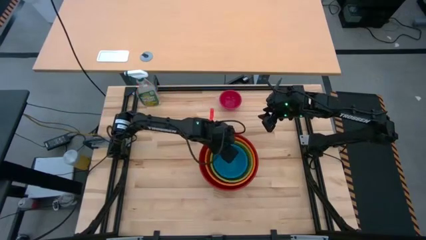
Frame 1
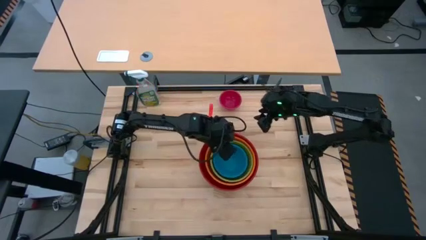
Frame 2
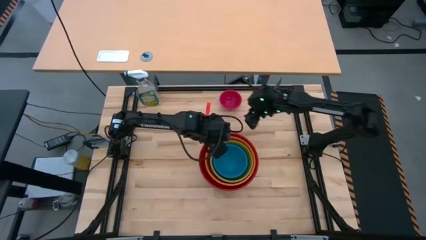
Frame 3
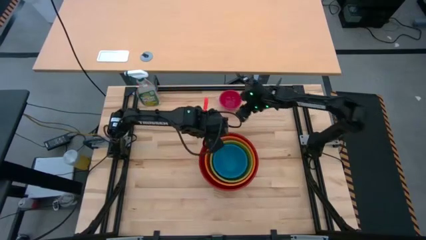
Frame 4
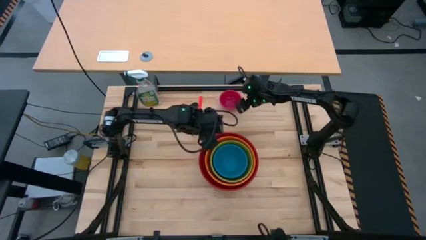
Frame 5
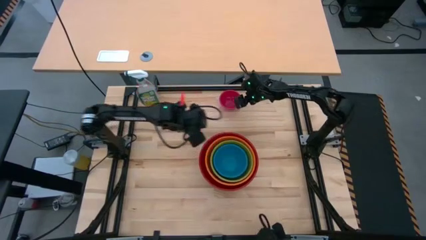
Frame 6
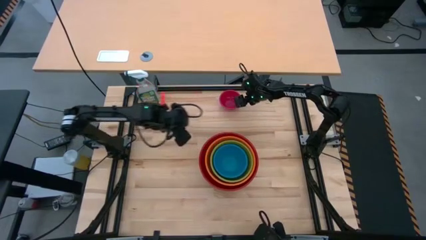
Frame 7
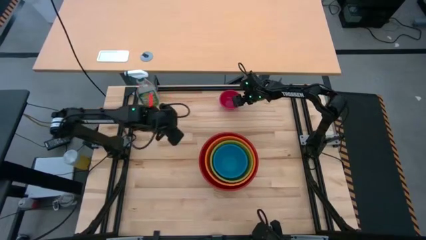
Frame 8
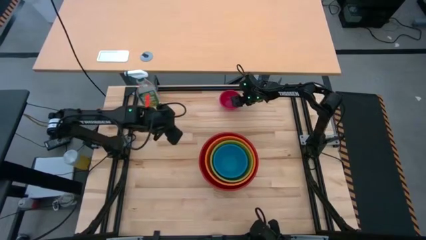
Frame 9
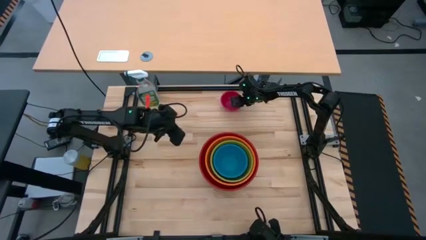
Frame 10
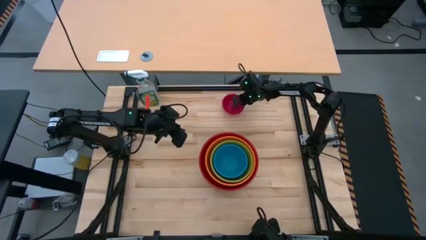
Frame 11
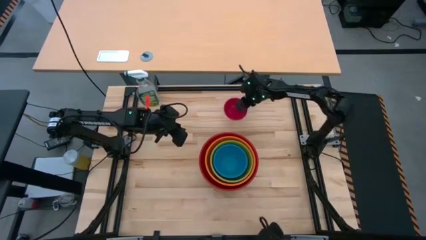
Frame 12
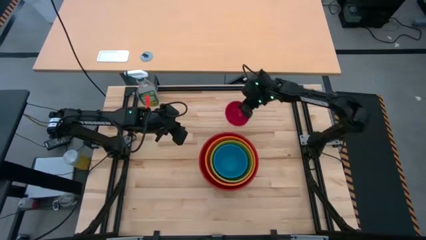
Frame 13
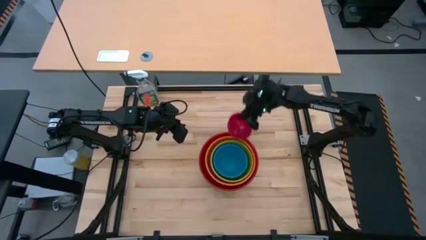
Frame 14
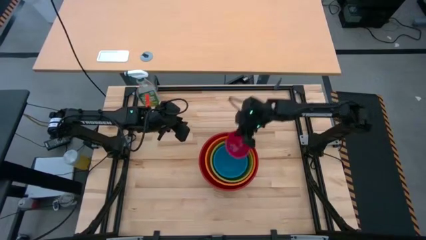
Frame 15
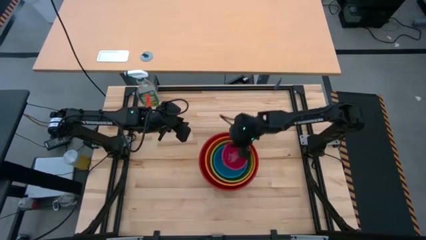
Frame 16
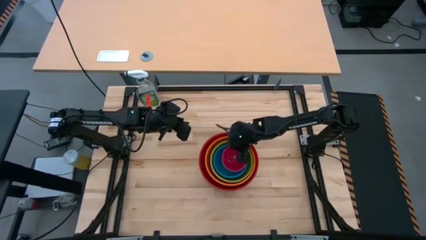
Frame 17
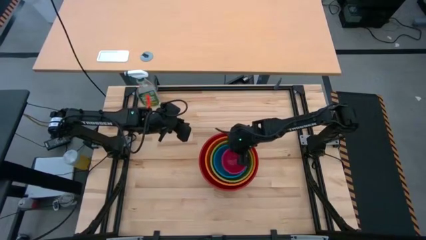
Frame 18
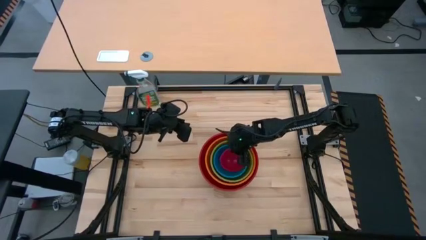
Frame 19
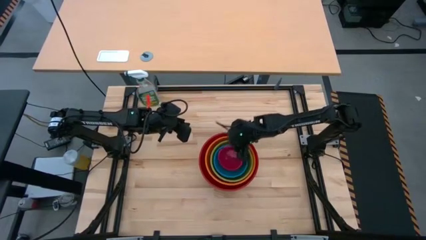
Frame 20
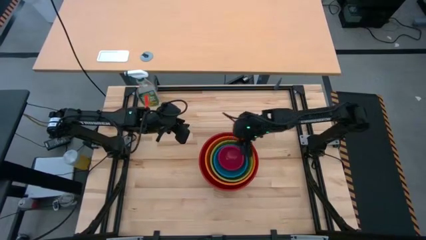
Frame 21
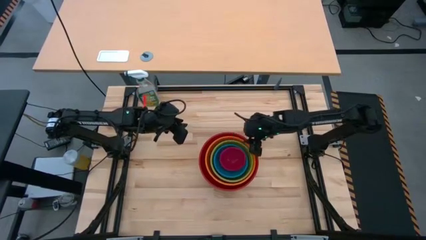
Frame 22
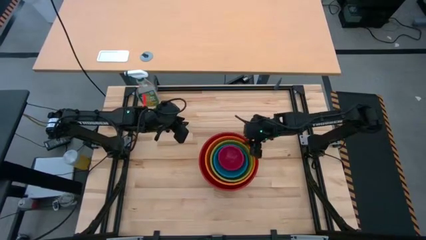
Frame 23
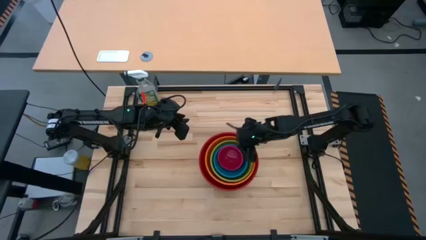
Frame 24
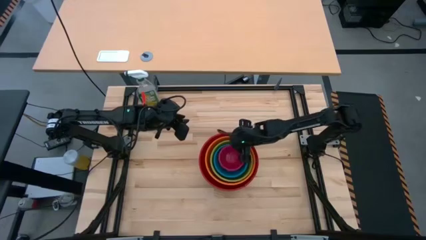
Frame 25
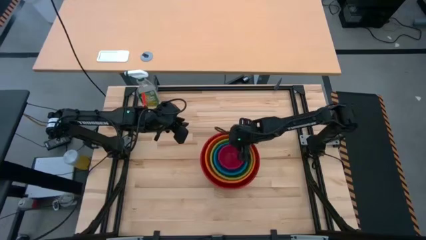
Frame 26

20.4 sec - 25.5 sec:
Stack the pink bowl on top of the blue bowl

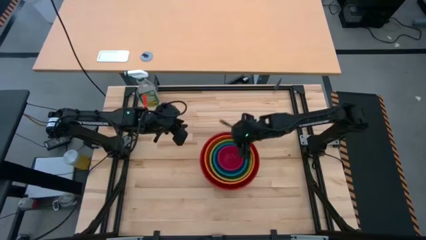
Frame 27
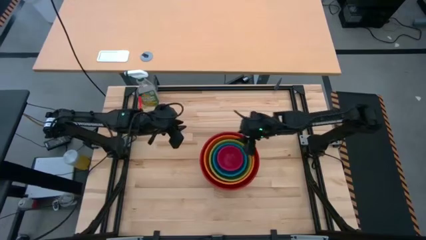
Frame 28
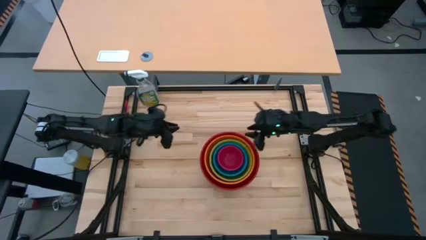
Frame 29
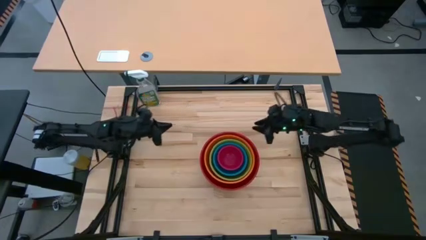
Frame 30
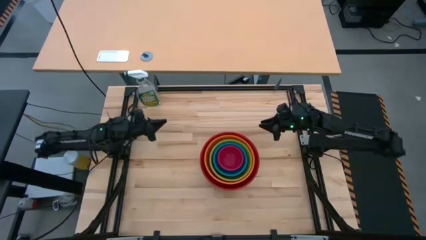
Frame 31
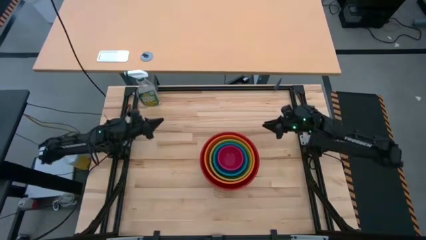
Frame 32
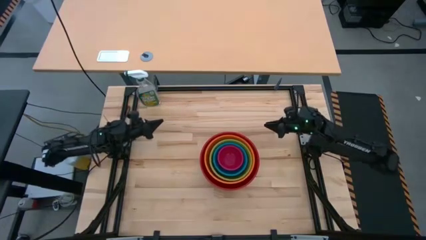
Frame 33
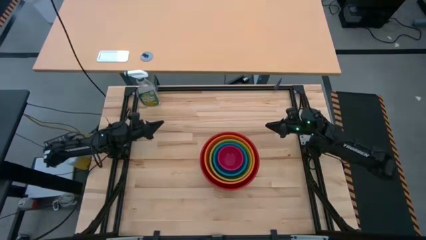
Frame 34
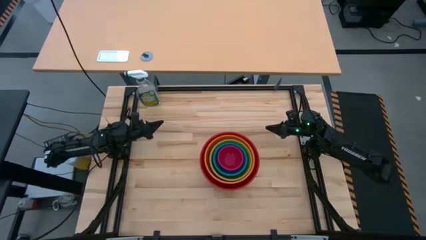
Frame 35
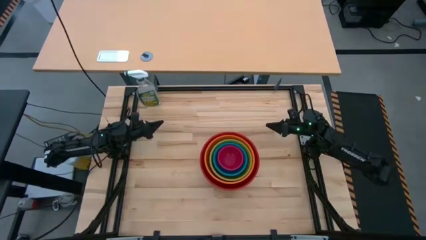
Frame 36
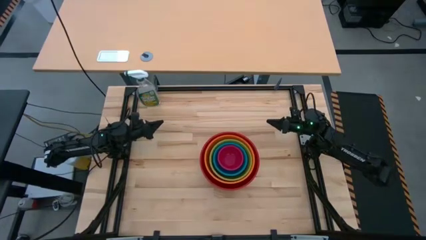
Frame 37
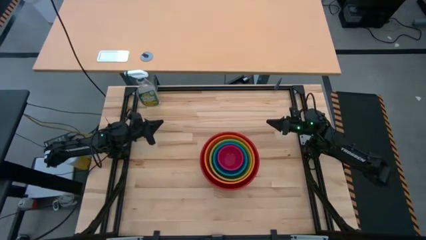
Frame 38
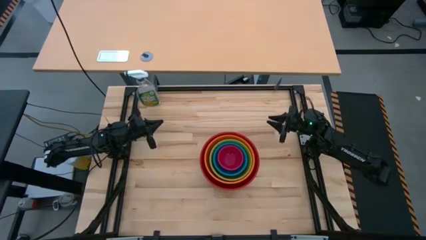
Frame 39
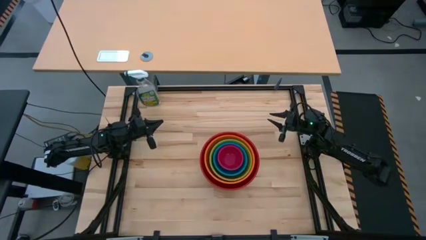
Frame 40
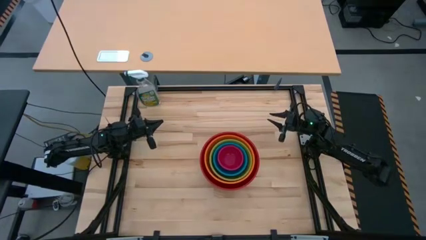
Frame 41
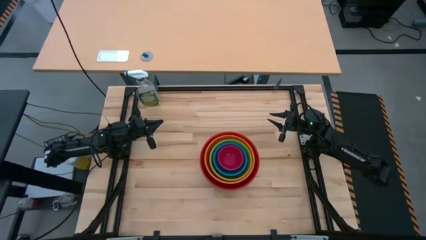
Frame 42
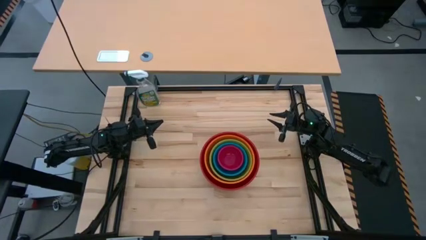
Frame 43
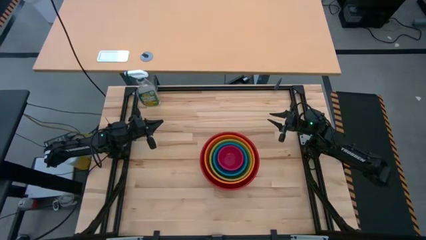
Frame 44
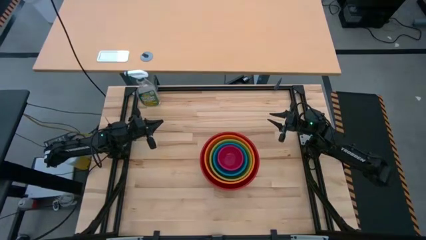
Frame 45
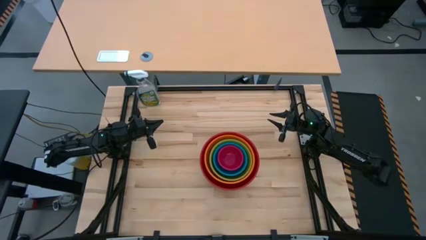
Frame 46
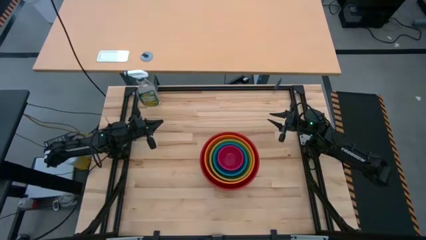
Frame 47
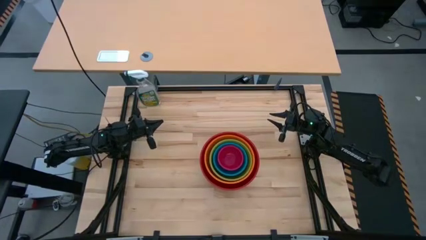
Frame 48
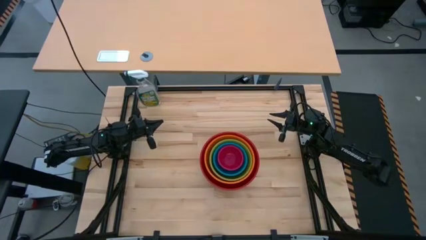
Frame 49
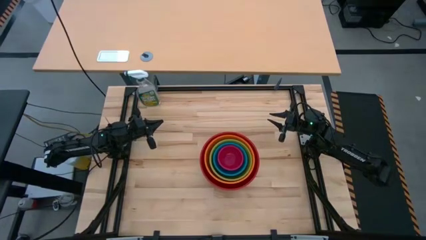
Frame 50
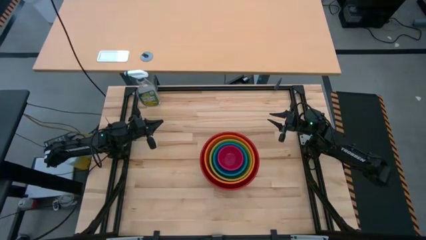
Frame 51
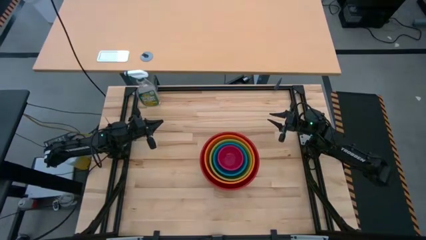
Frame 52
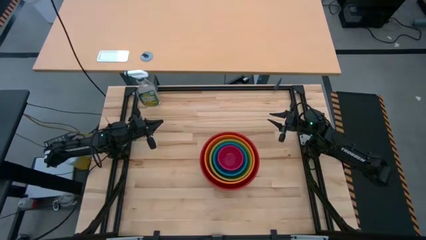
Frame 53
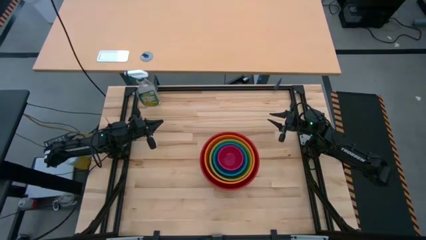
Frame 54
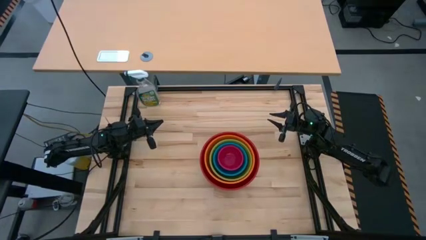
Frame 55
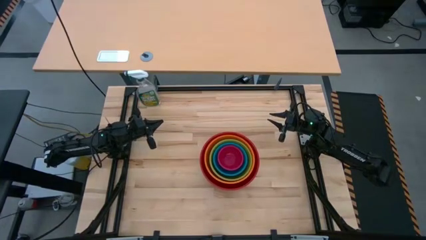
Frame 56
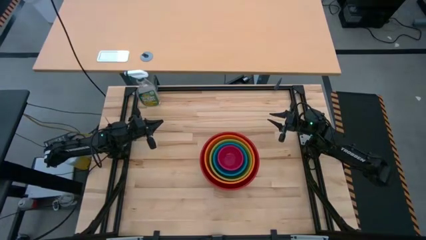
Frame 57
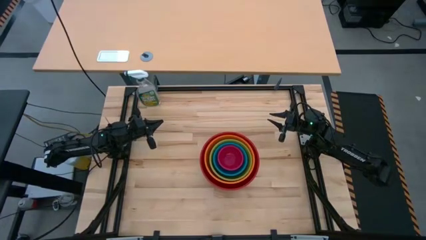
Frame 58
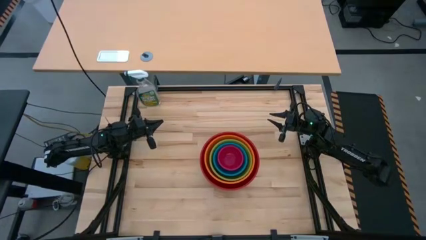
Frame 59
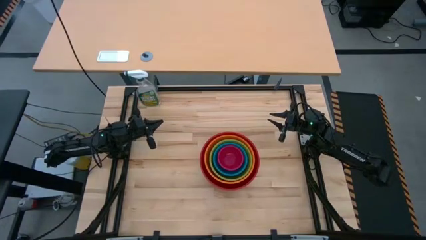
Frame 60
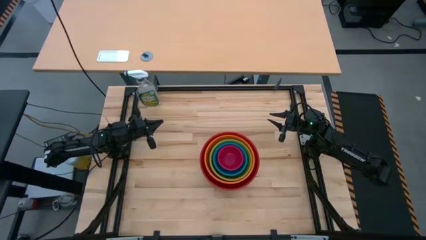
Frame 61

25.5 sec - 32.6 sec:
Return to Home Position
